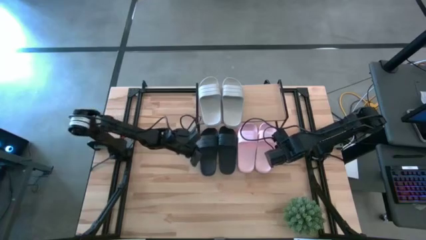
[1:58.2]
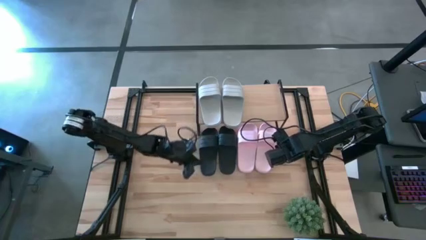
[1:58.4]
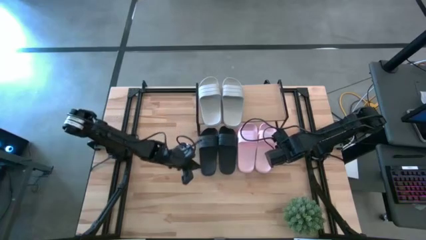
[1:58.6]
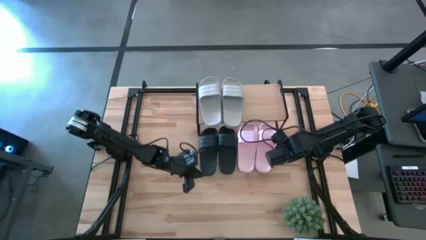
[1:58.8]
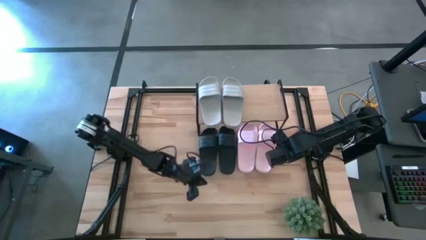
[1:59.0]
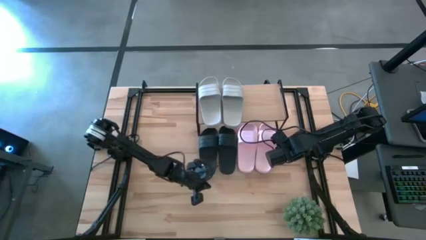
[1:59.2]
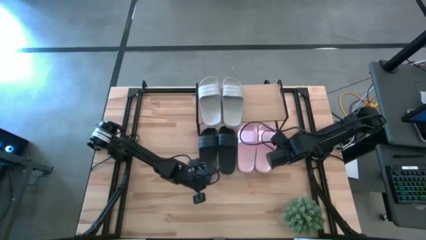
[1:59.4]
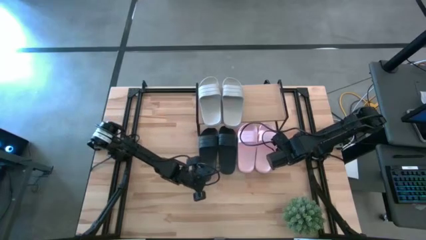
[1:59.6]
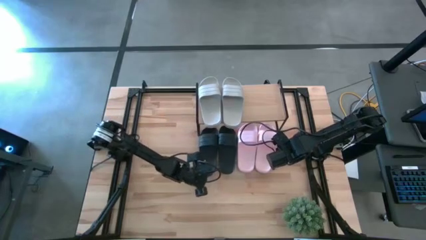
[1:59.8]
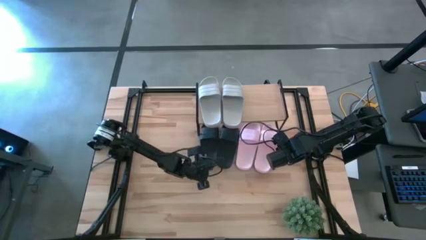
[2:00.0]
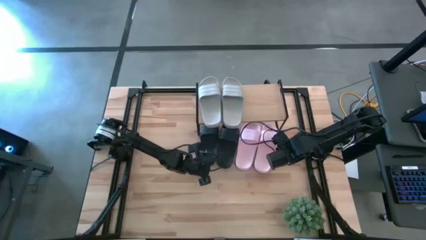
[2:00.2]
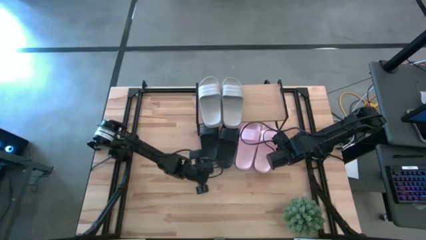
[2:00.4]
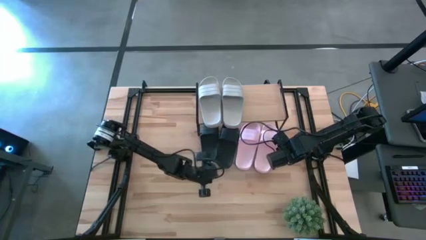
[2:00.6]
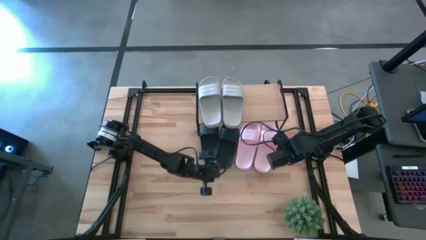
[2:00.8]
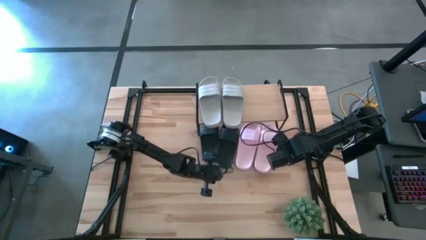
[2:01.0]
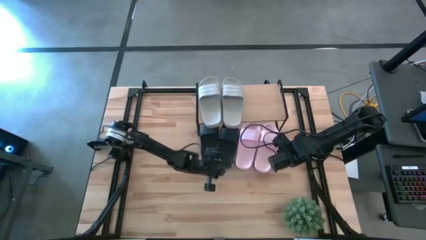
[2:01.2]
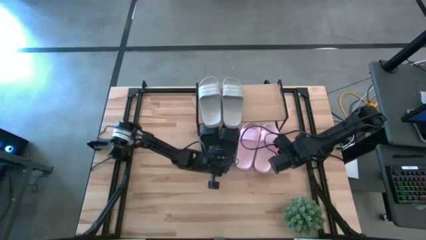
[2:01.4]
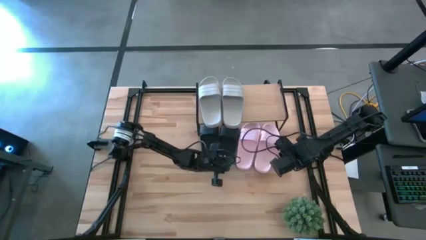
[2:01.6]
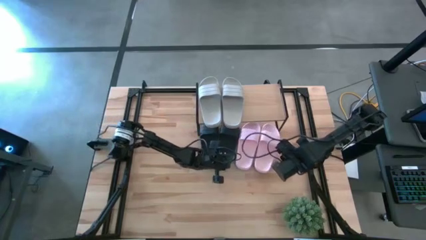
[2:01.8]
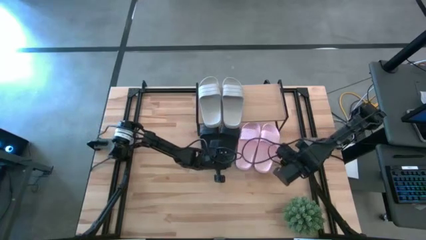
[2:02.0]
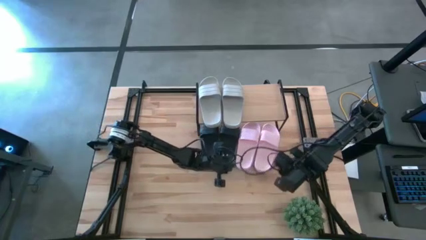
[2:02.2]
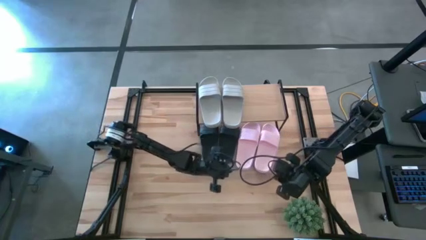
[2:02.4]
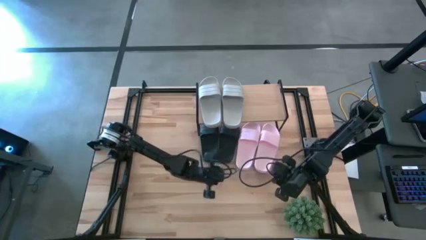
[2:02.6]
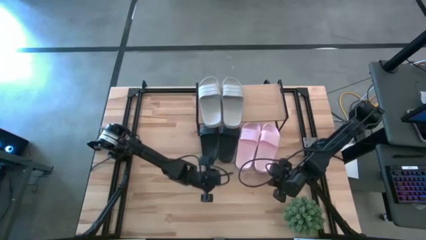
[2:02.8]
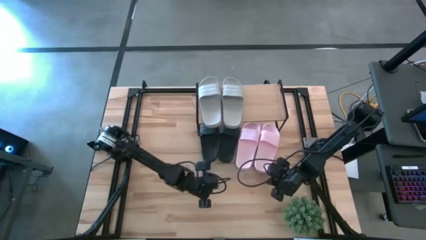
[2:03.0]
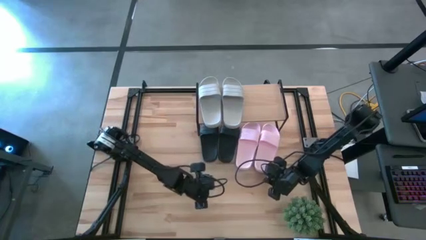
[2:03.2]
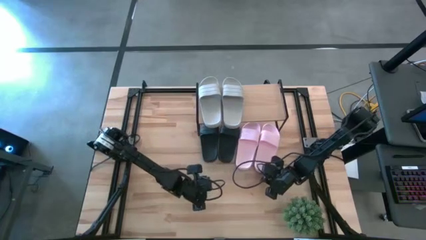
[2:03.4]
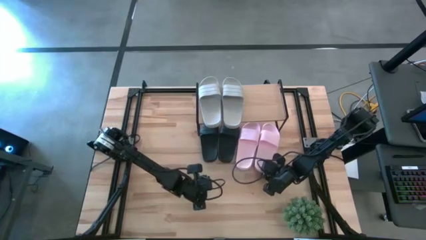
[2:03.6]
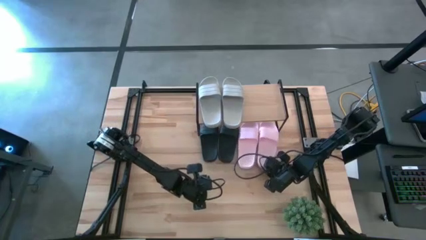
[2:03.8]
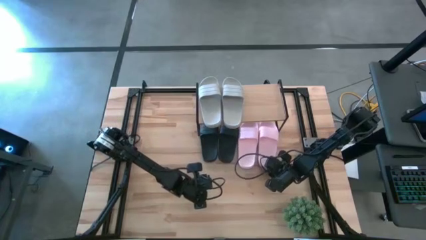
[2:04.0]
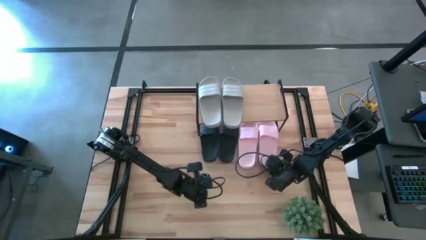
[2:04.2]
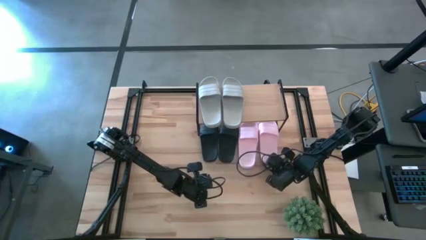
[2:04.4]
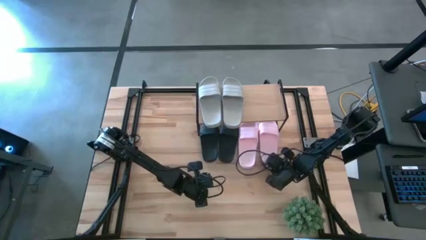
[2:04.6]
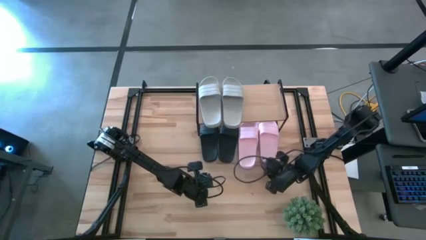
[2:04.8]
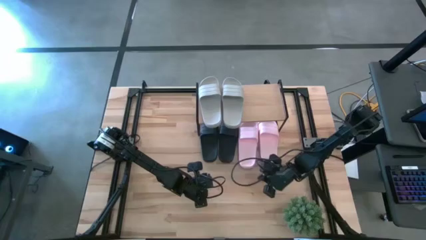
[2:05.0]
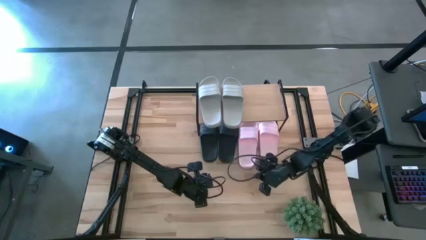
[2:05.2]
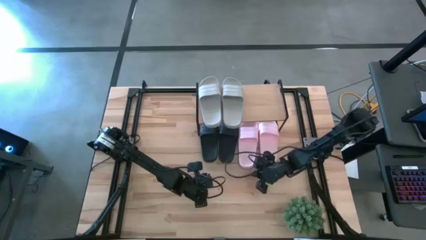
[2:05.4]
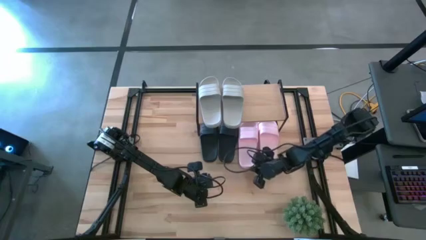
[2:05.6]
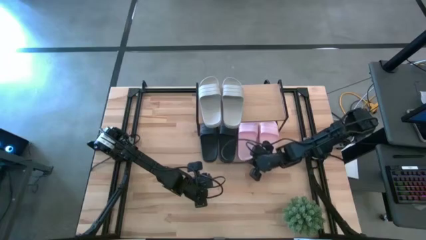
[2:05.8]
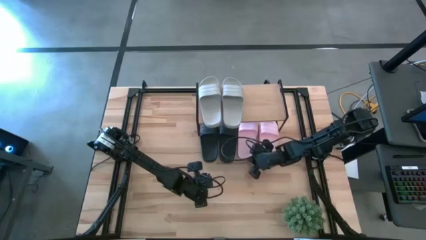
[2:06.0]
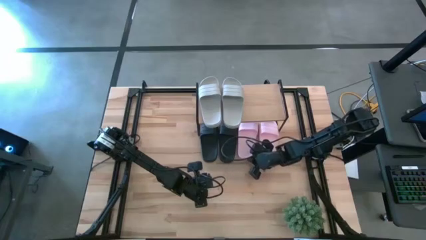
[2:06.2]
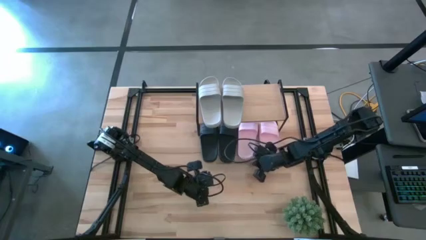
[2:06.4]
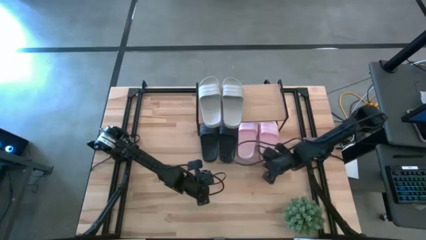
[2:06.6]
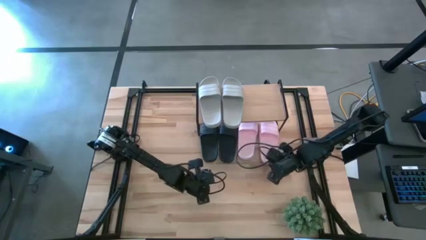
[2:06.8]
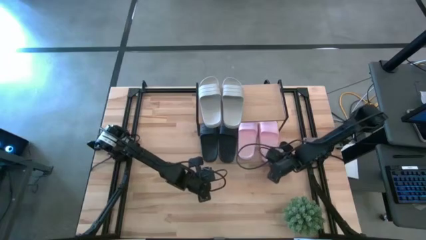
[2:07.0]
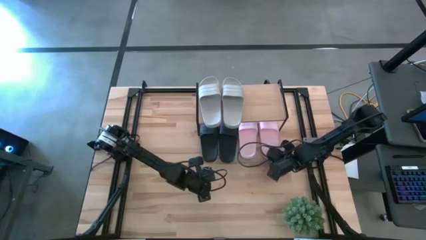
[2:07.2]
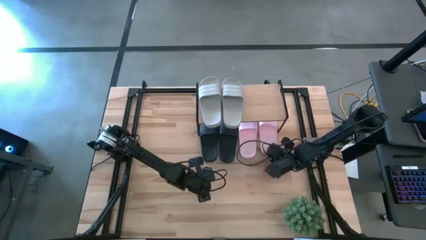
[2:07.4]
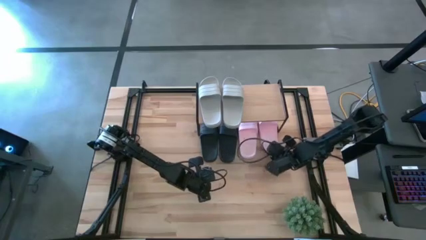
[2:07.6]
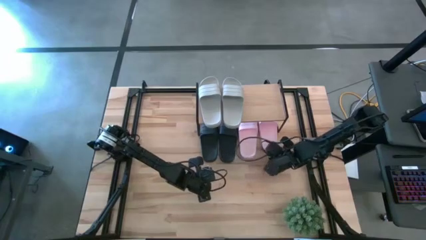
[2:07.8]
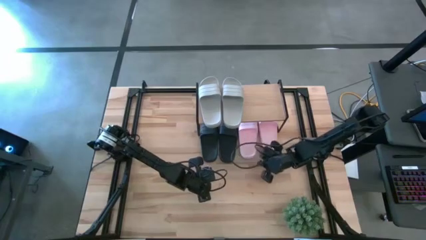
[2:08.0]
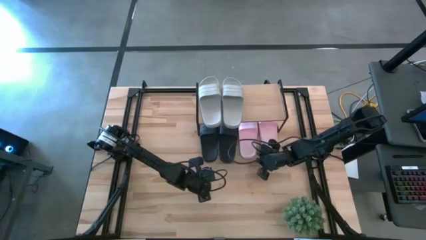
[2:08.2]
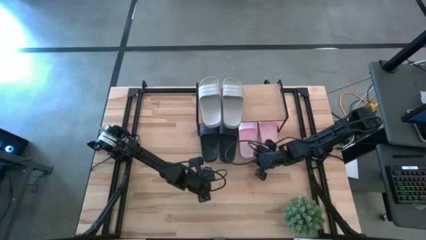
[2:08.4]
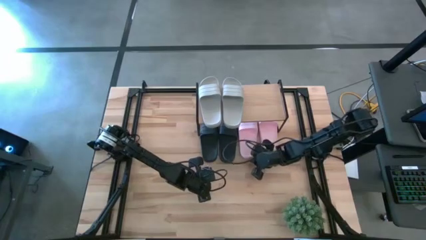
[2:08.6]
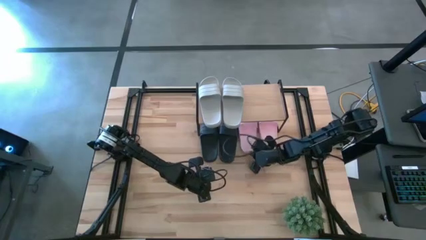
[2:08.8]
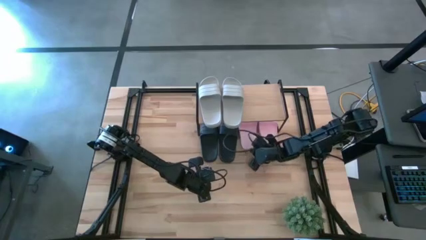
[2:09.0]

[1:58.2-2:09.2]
Task: Pick and place slides into the shelf
Move the black and pink slides under the shelf
